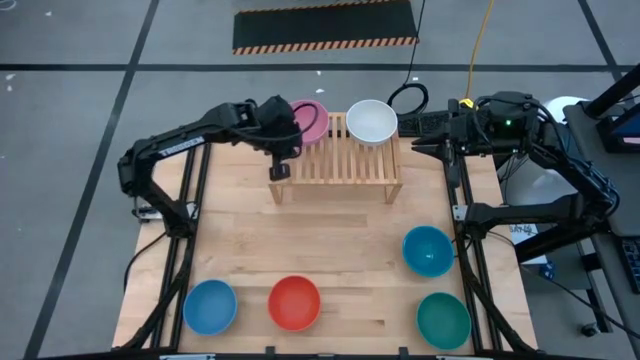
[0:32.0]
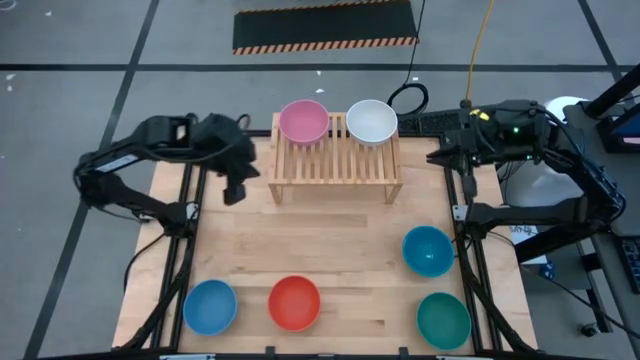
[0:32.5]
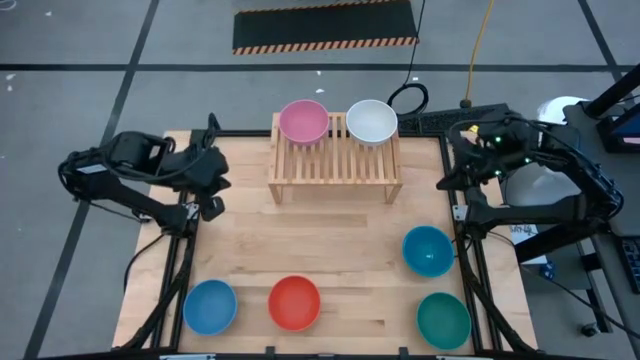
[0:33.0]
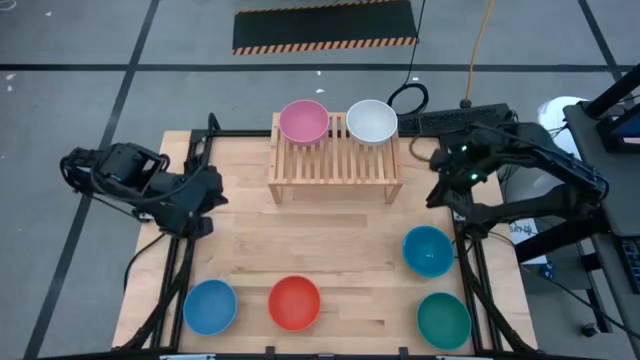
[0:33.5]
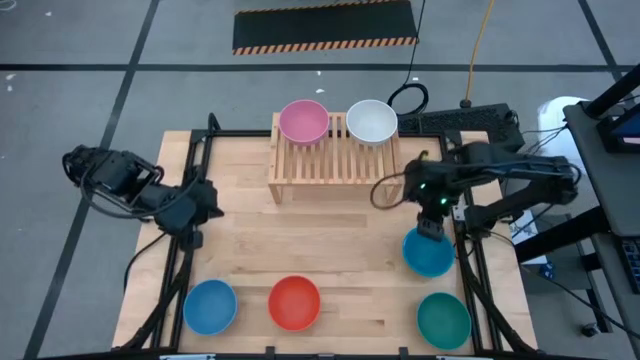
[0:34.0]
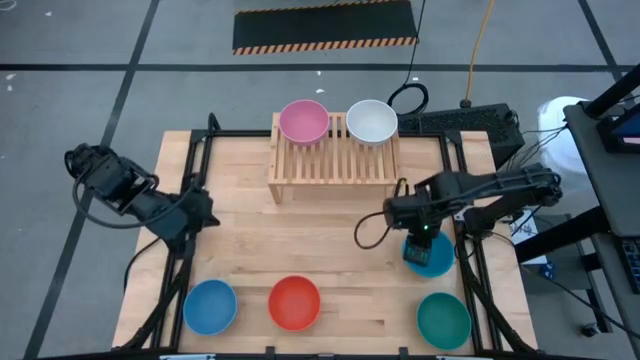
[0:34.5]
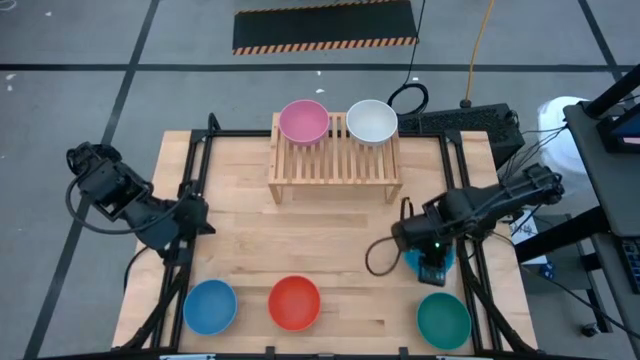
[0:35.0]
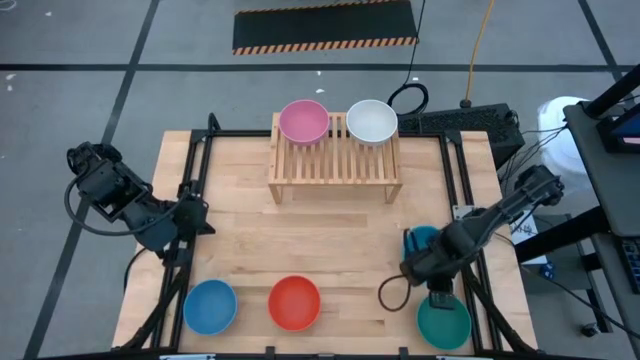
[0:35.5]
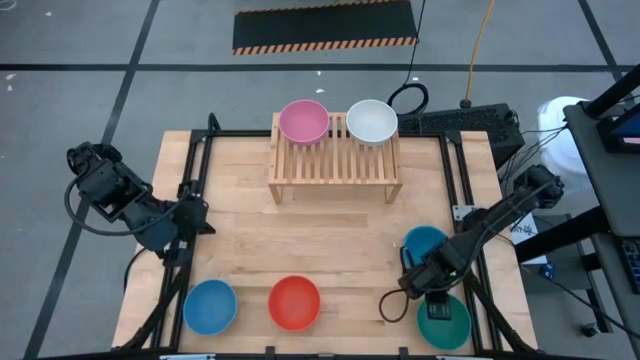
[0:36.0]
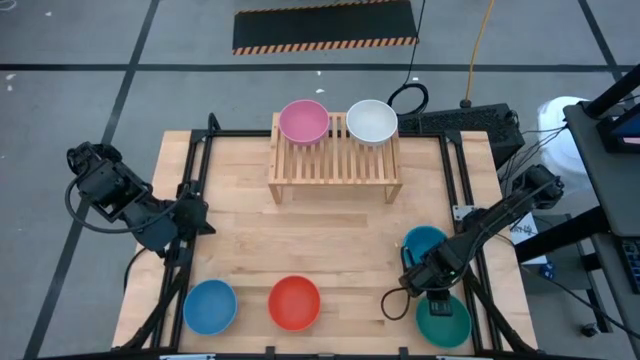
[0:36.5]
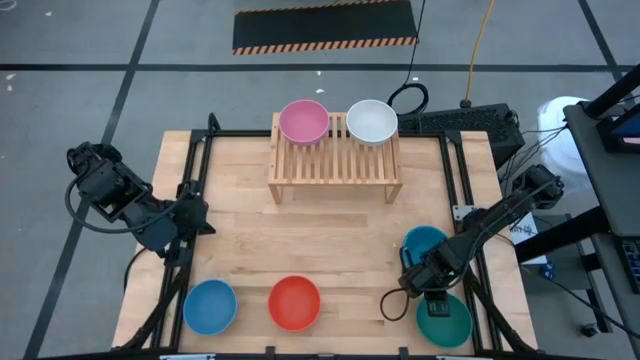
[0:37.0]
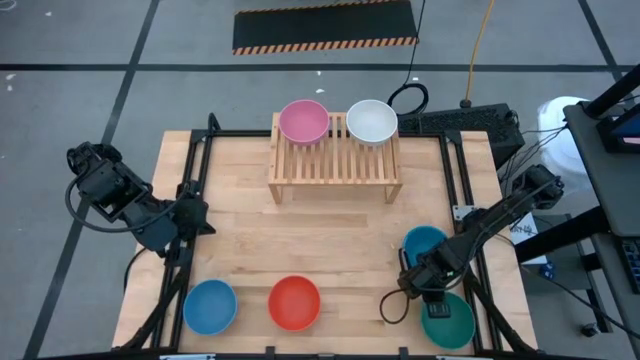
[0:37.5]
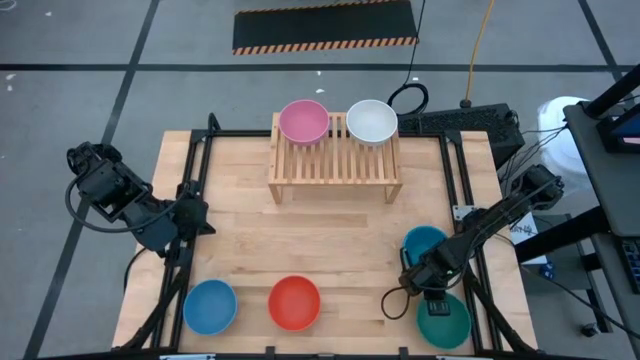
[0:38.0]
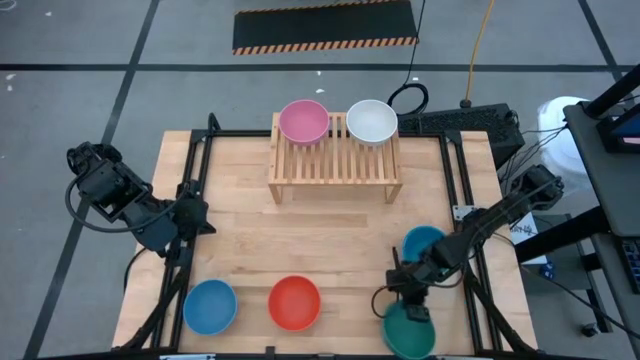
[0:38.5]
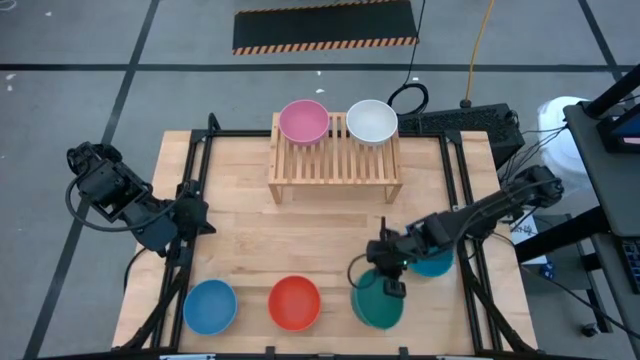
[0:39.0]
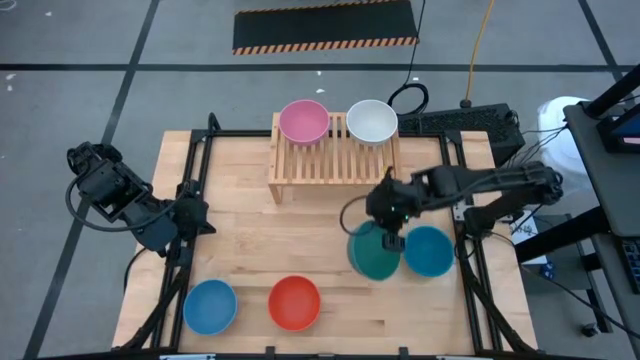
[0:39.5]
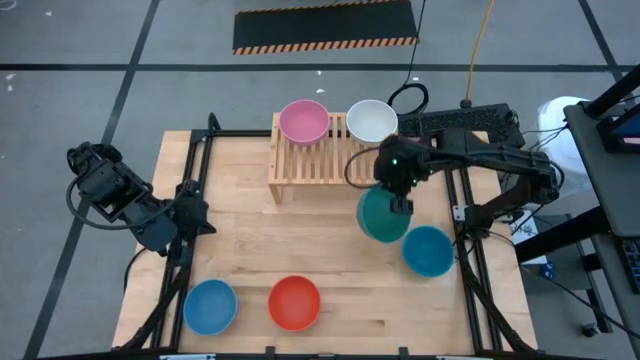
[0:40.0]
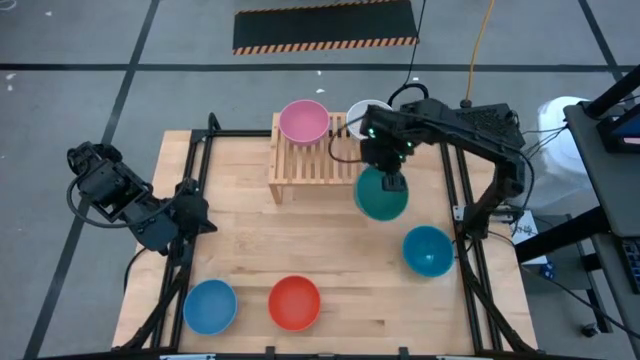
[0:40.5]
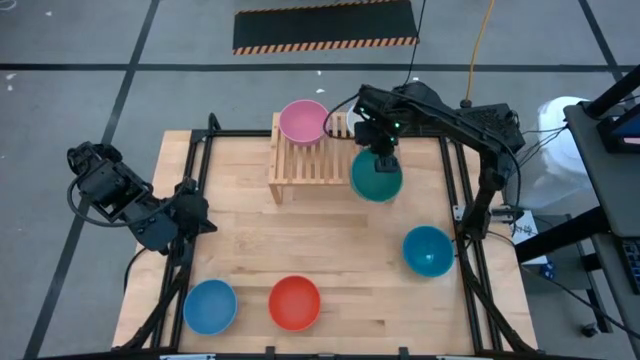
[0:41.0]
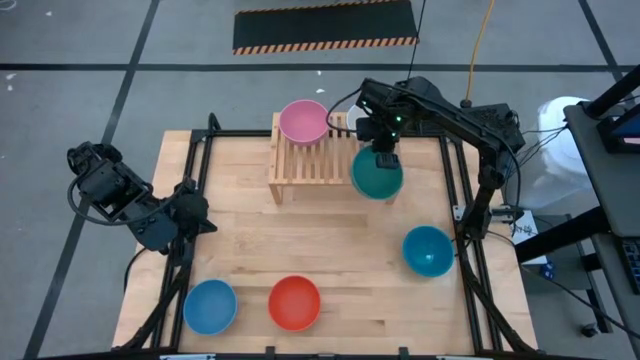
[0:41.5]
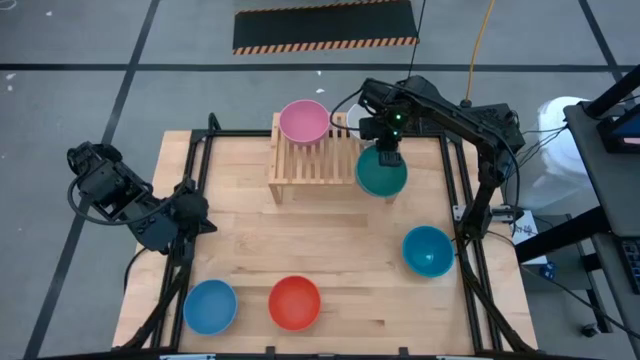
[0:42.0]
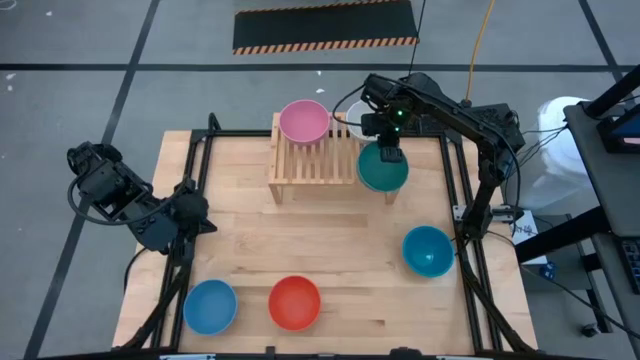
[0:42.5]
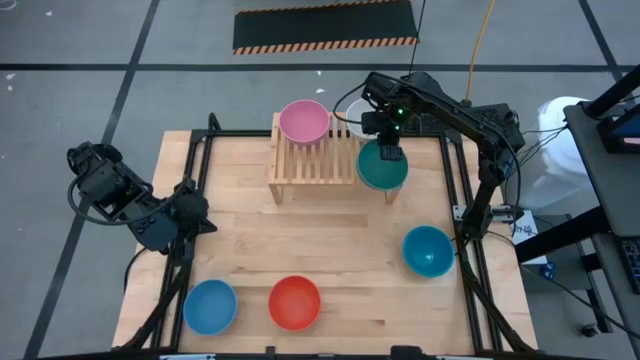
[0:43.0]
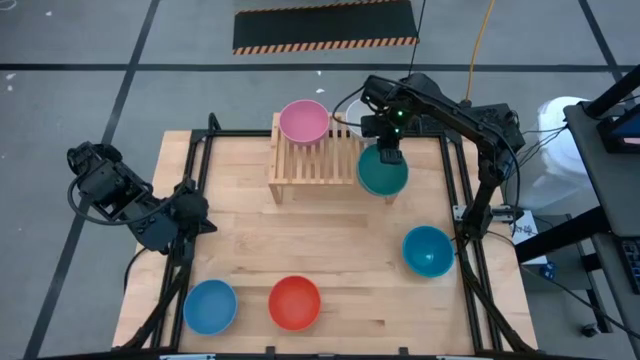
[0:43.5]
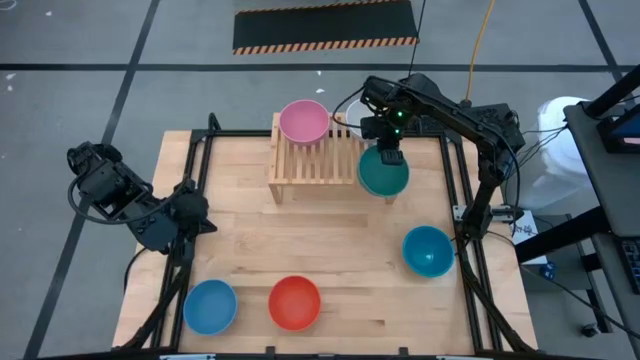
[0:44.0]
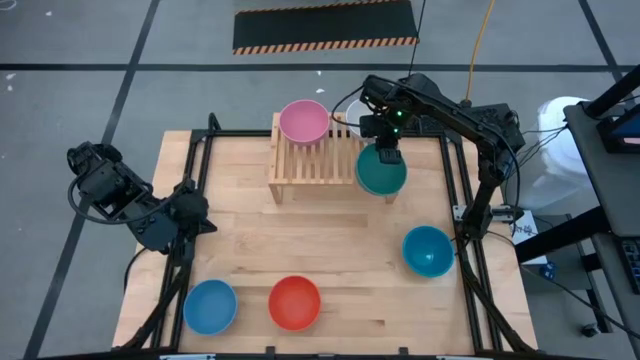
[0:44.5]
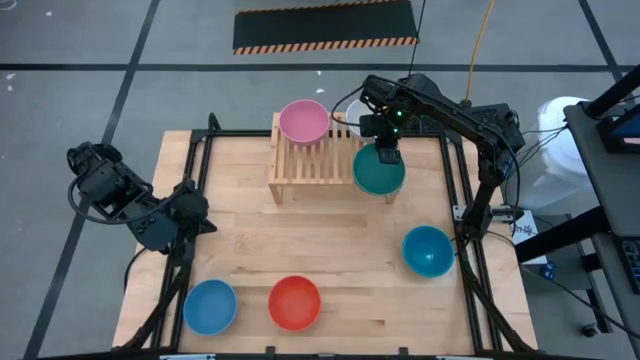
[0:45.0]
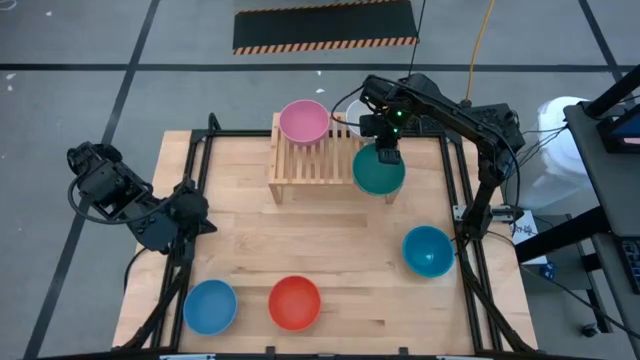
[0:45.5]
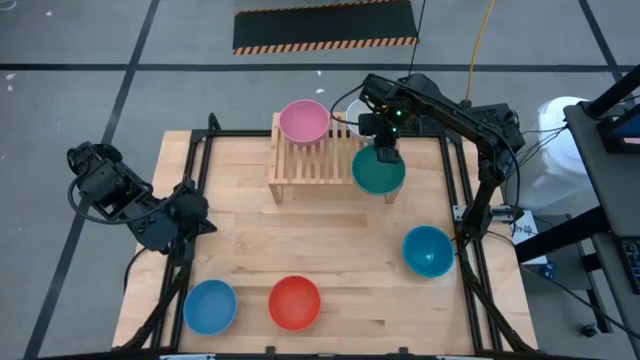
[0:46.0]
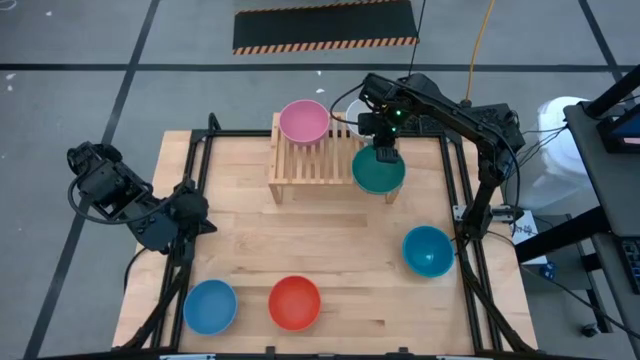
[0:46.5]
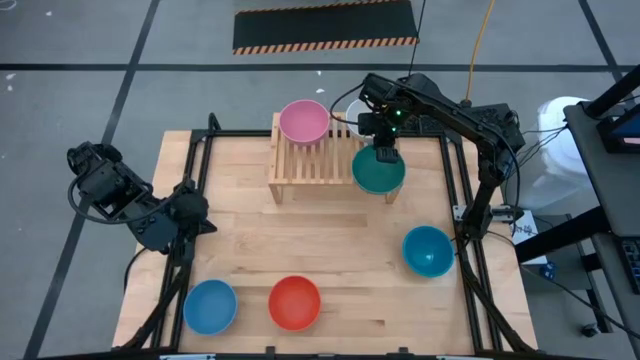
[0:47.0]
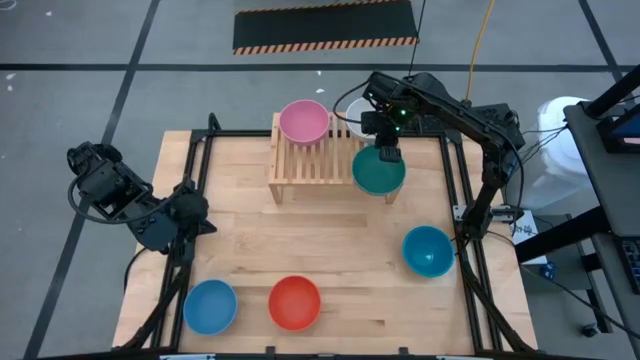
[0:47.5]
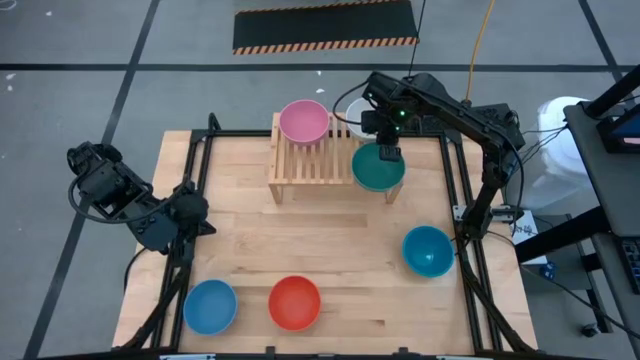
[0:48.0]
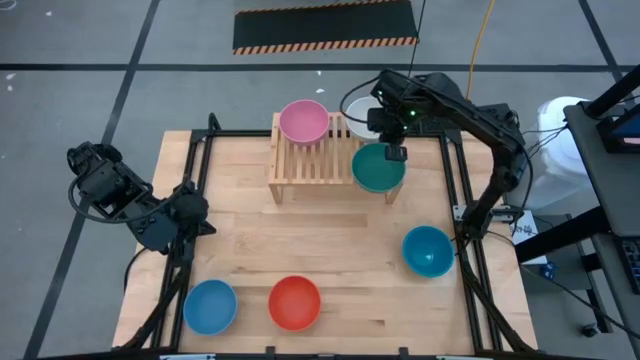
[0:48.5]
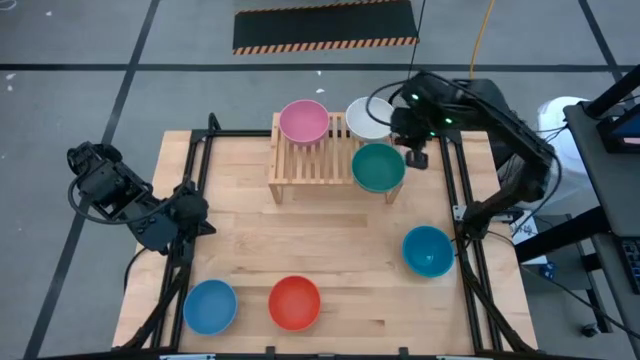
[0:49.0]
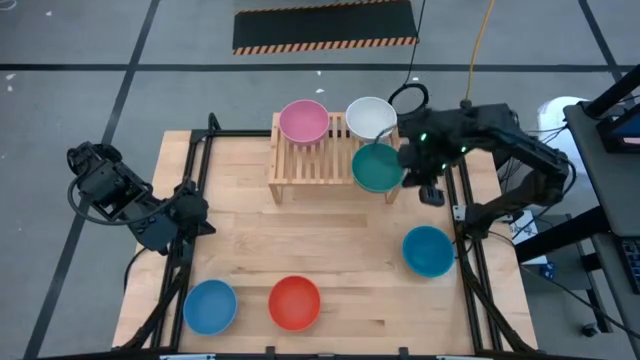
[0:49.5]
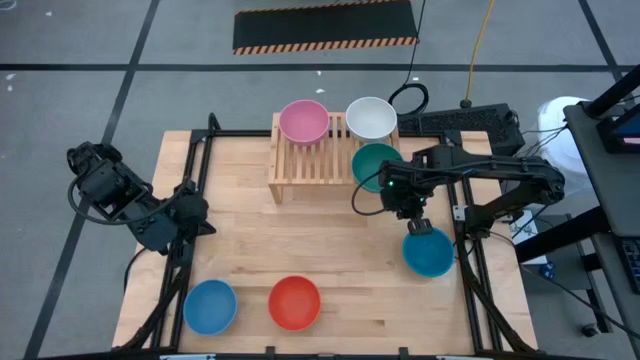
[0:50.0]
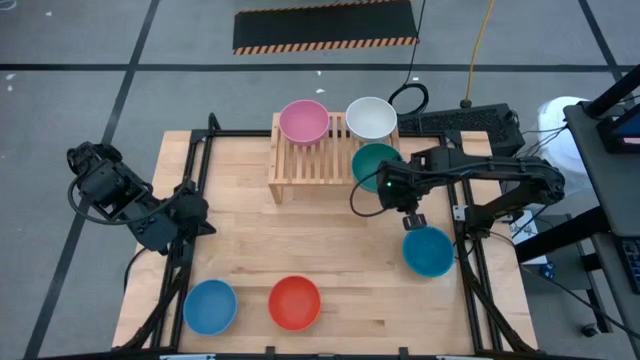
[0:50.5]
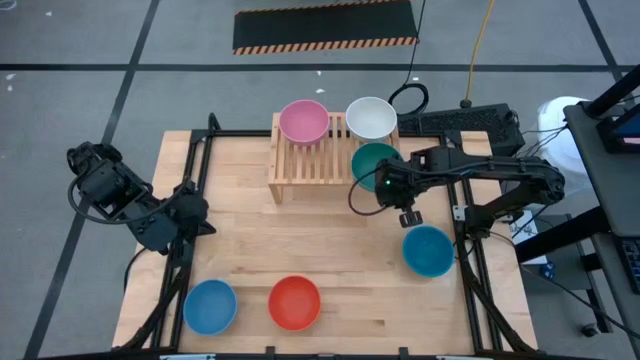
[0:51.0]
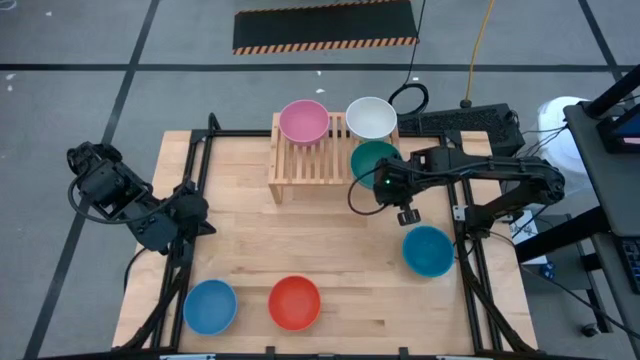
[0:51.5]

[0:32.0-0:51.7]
Task: Place and stack bowls onto a shelf
Put the green bowl on the shelf
